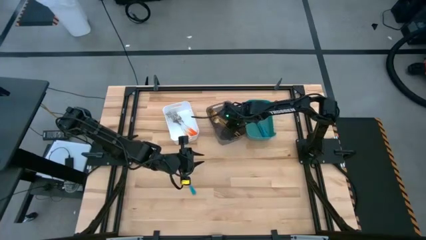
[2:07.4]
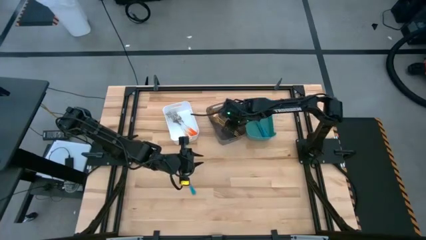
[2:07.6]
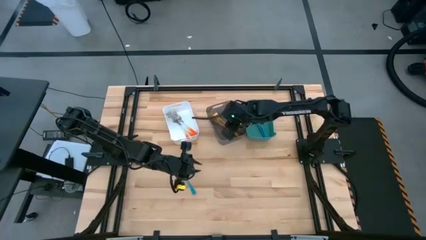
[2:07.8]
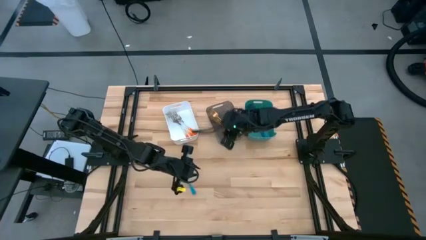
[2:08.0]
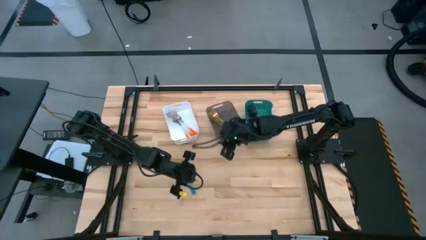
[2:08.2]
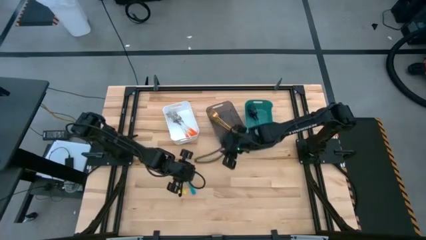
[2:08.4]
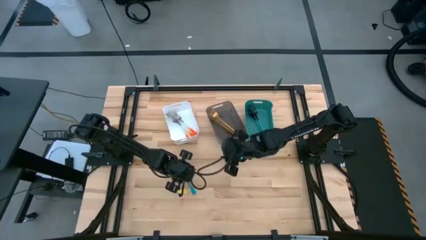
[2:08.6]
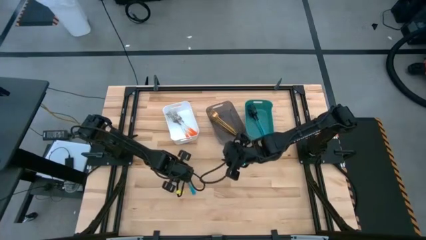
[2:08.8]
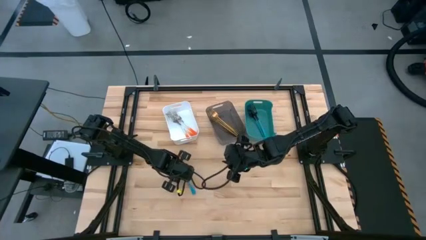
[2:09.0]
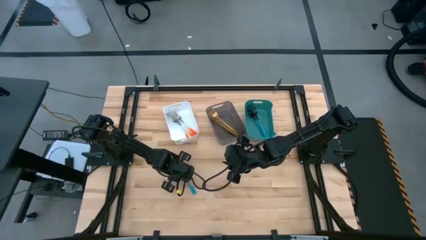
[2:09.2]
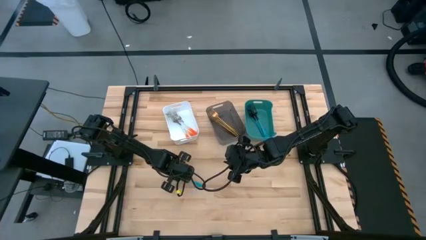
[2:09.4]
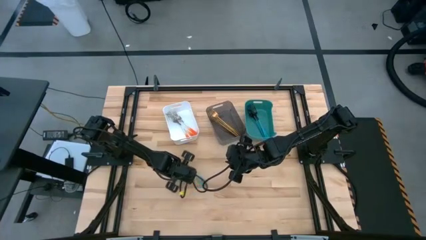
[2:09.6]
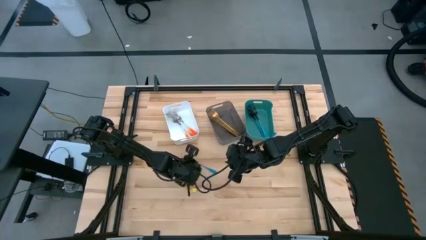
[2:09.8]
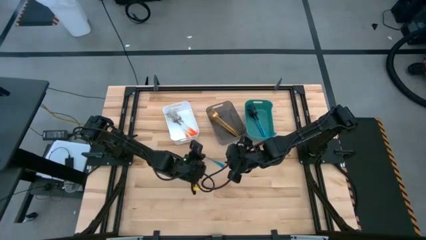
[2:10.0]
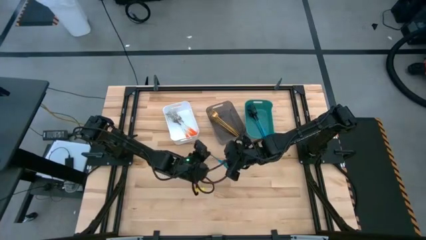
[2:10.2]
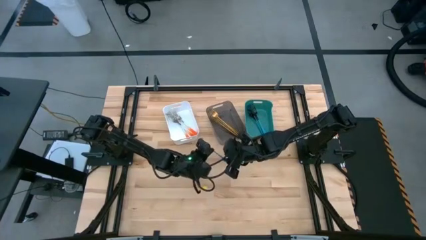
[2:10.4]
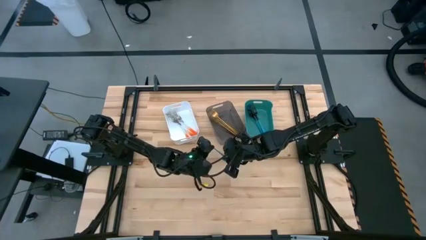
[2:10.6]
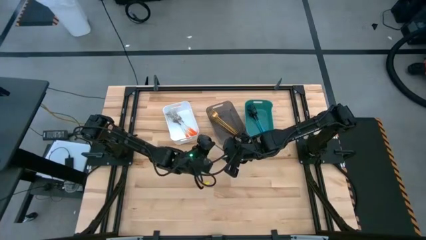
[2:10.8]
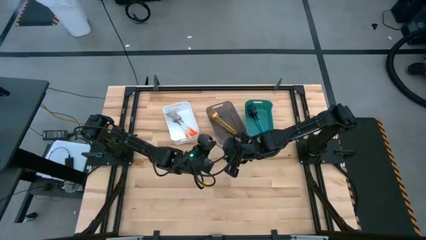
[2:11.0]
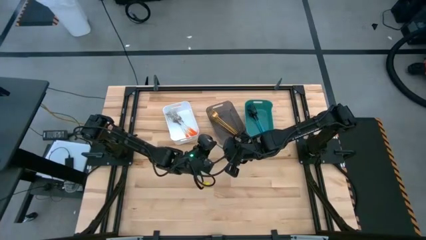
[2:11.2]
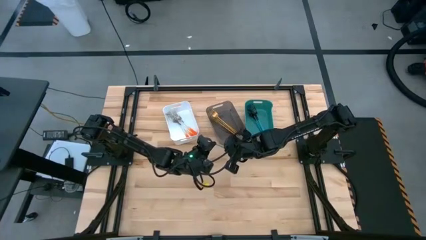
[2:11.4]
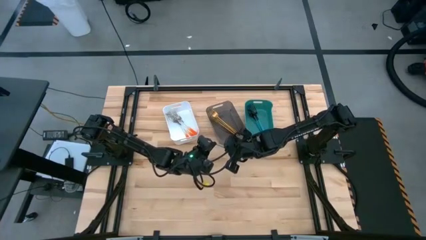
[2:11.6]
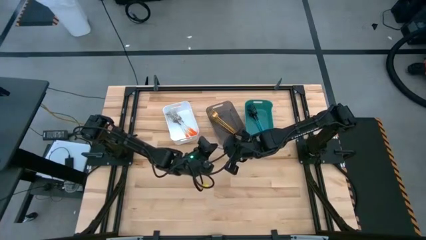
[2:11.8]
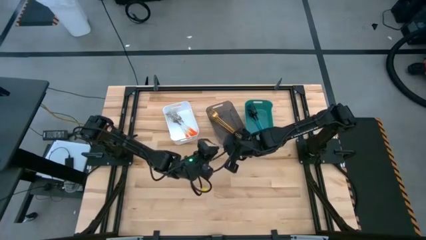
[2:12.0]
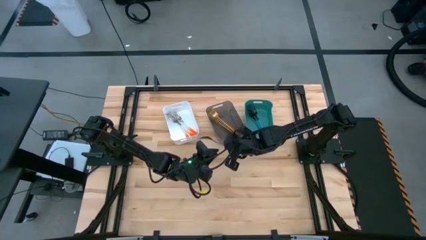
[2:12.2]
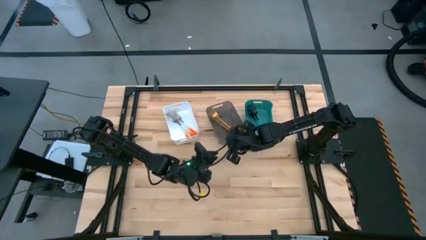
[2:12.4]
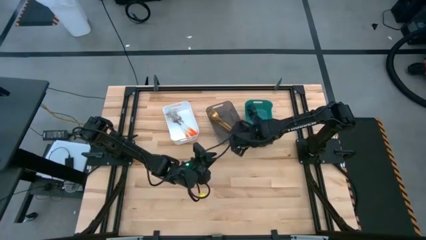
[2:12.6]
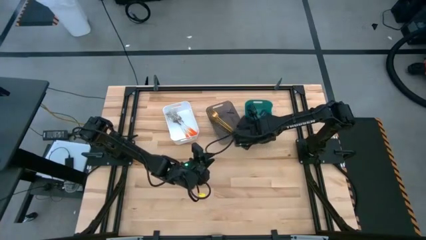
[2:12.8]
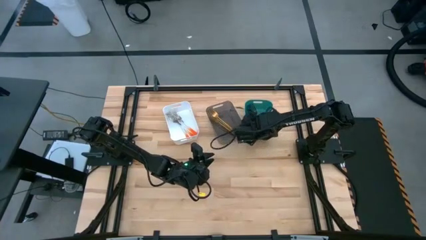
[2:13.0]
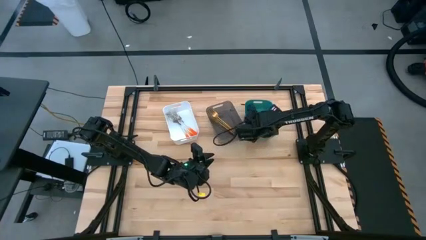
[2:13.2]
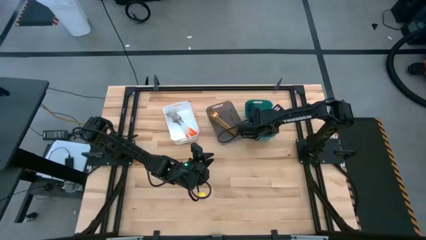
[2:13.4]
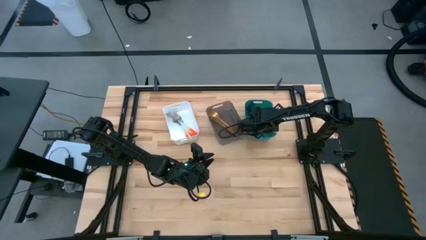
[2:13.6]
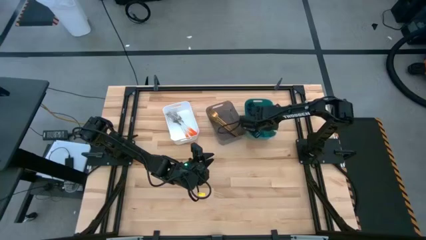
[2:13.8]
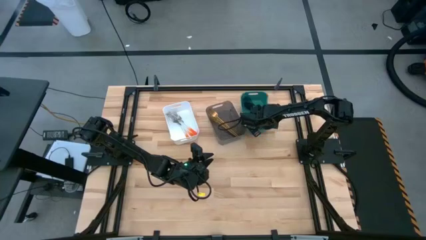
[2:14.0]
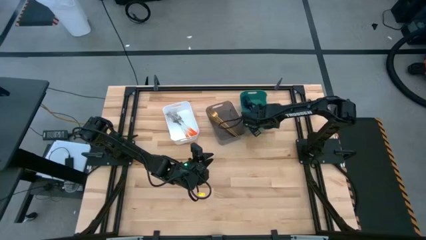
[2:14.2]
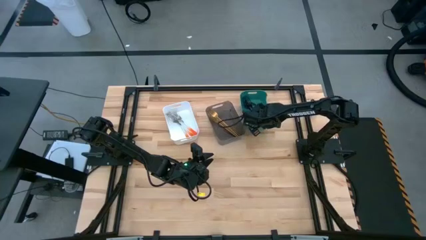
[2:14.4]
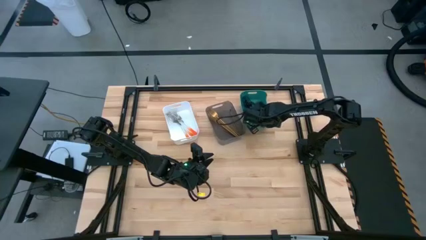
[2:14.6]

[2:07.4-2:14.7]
Task: Sort silverware by color (type)
Put the blue fork into the green bin

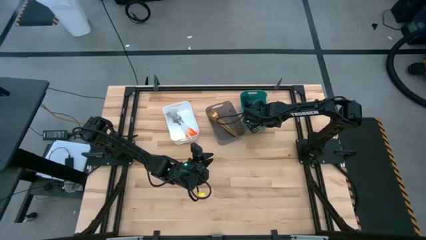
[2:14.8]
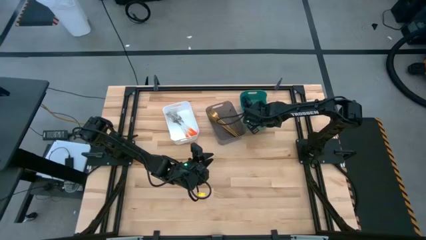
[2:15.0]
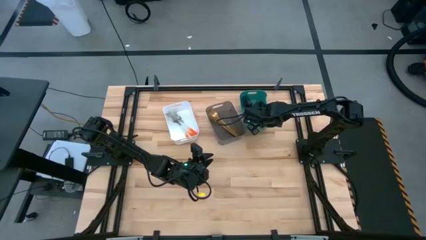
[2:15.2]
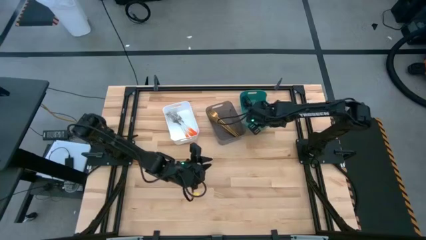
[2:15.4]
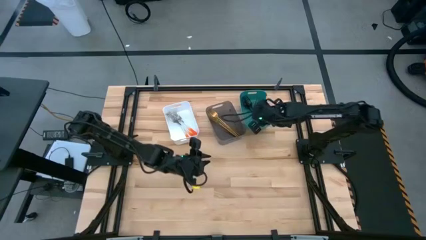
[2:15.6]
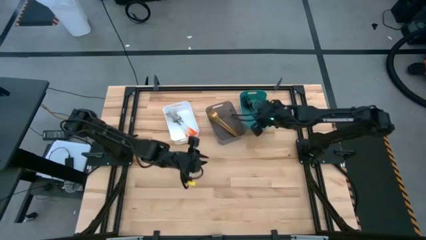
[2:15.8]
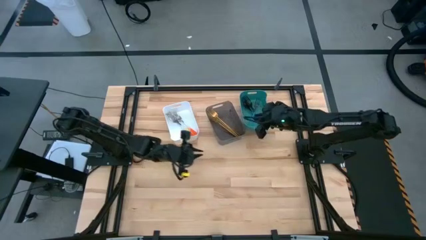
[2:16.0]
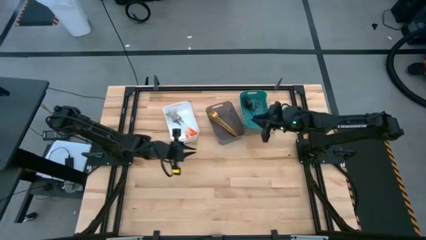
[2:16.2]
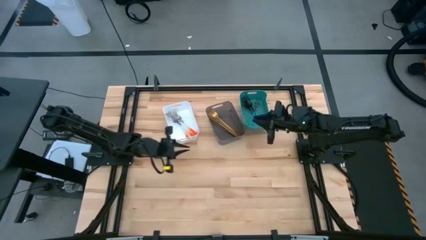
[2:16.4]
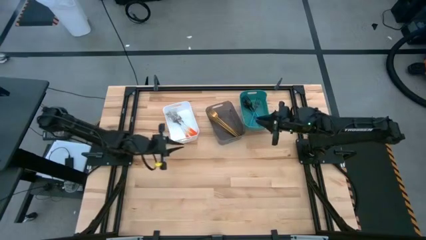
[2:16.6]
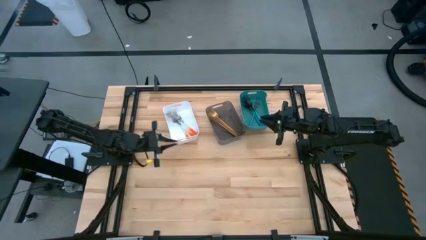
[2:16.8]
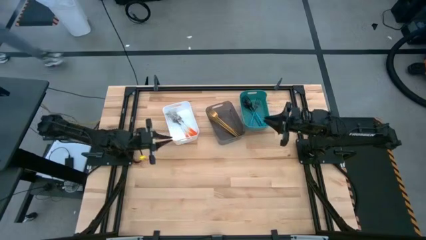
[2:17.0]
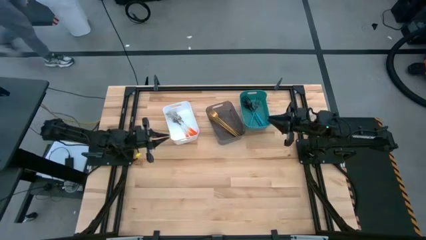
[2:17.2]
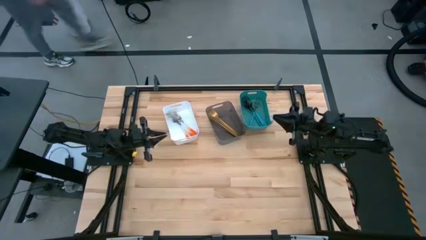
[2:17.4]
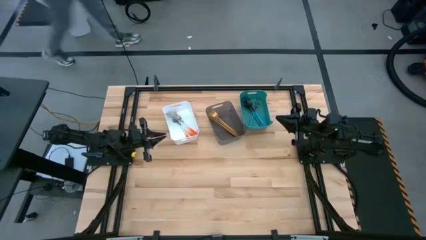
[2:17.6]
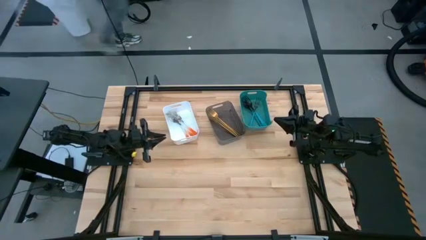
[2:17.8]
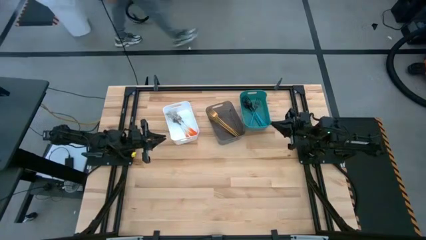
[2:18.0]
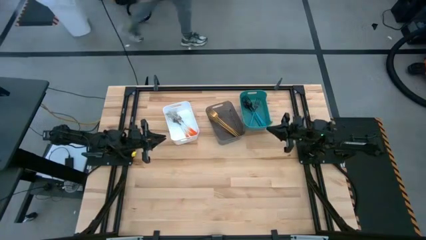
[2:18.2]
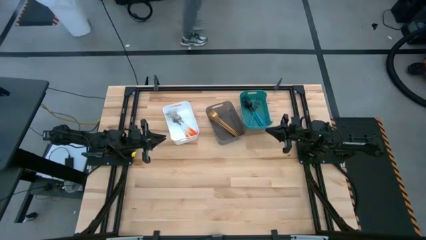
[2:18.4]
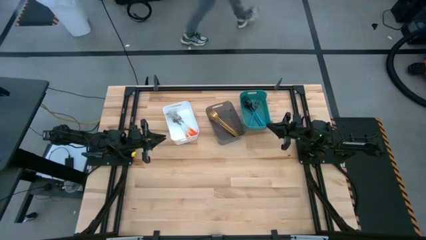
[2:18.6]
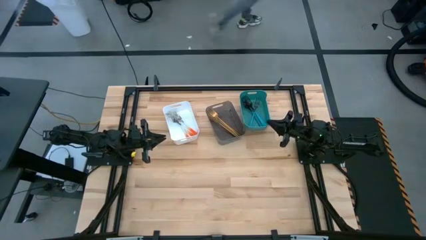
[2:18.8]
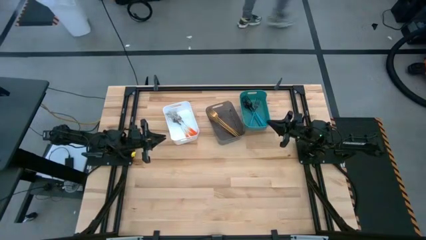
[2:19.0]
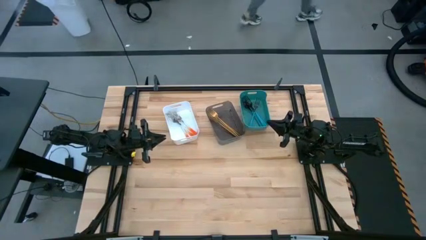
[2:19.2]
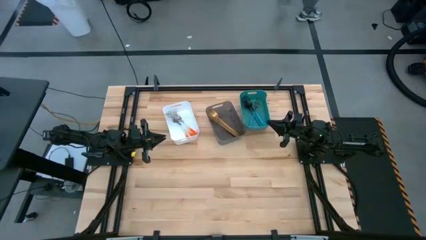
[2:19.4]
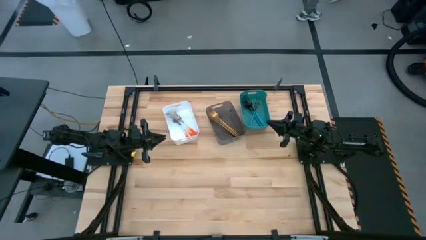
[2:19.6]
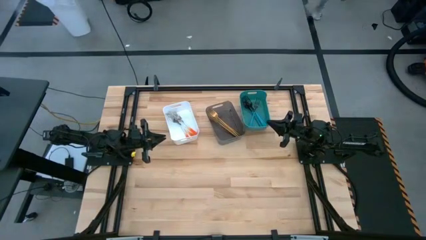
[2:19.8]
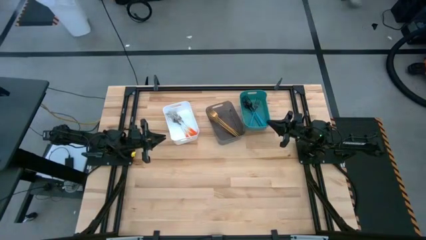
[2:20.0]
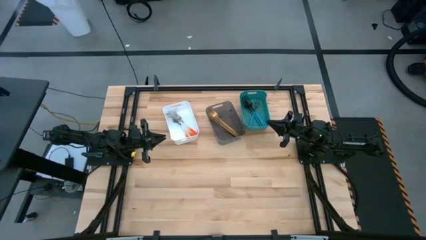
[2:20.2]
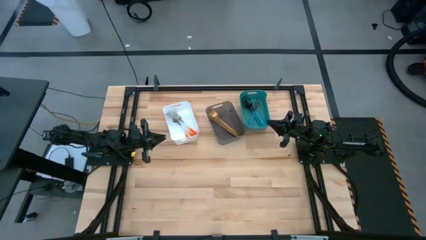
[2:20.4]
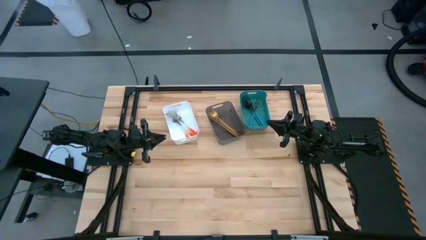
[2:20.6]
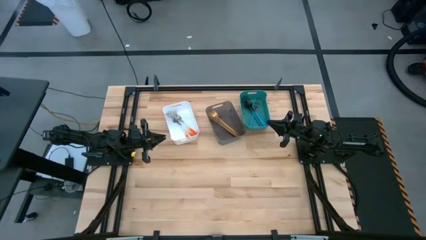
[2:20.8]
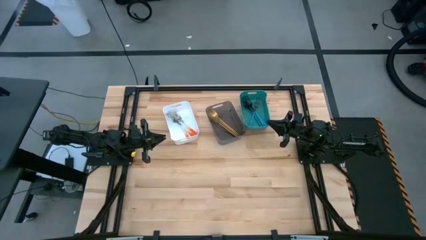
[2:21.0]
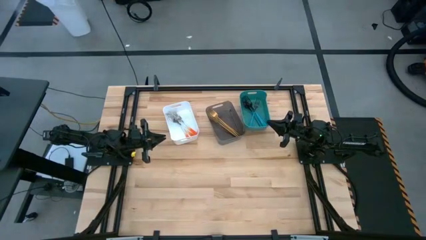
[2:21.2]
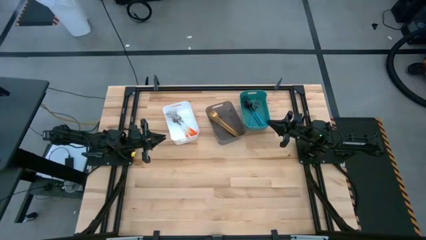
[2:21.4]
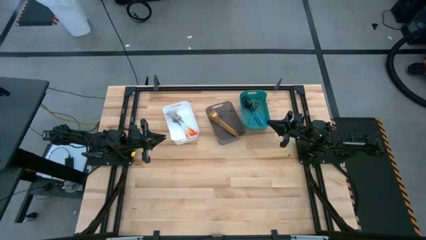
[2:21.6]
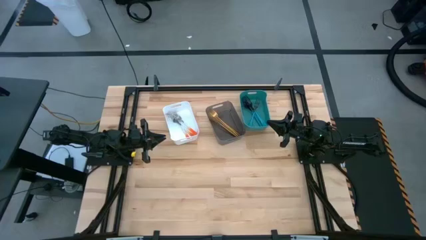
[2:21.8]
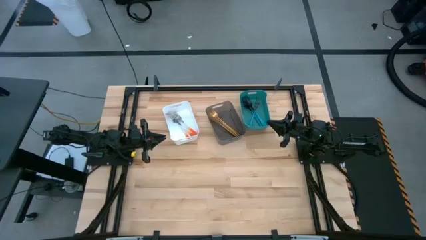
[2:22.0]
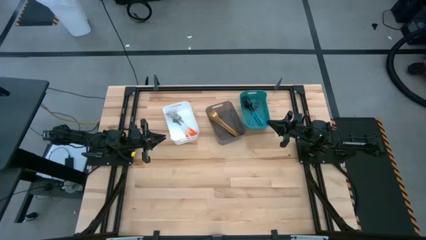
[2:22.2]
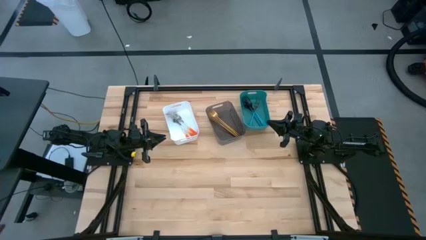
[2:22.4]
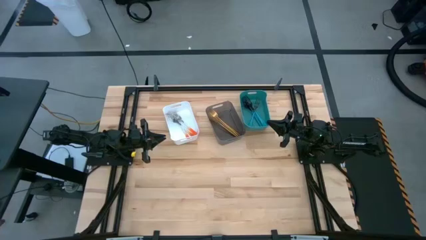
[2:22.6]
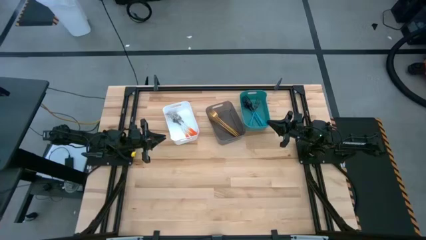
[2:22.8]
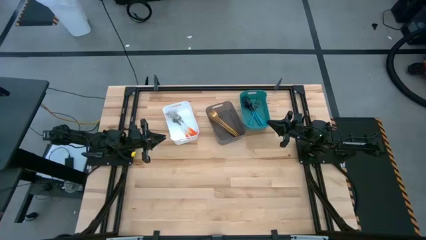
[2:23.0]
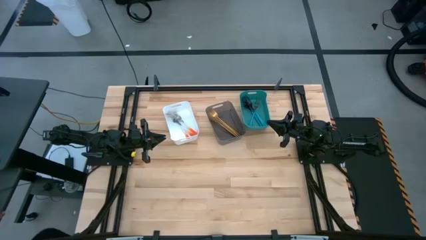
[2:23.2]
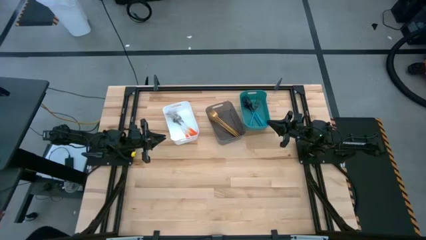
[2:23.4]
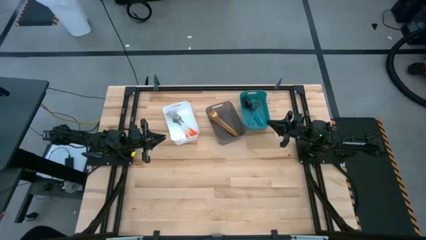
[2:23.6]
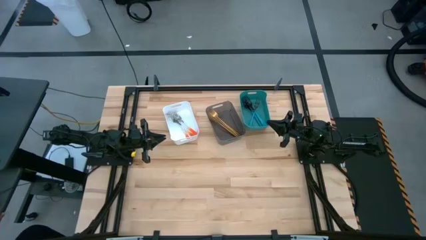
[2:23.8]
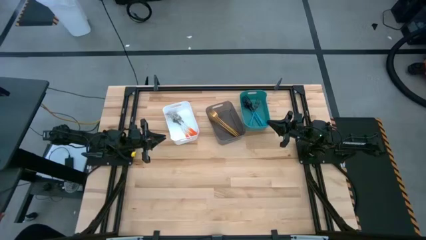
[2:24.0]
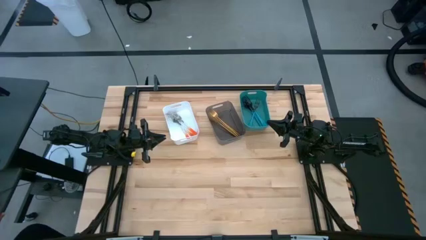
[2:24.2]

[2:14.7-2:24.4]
Return to Home Position
